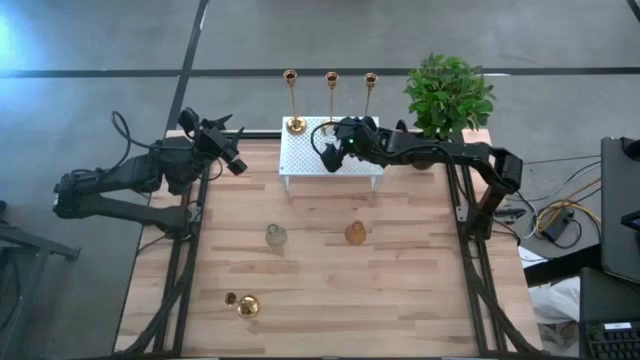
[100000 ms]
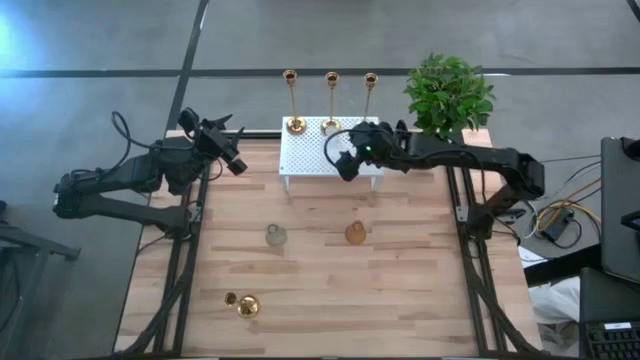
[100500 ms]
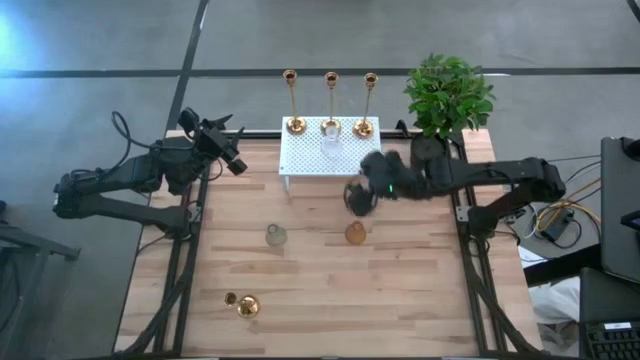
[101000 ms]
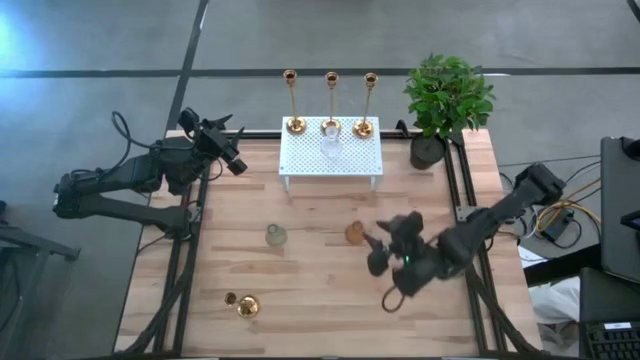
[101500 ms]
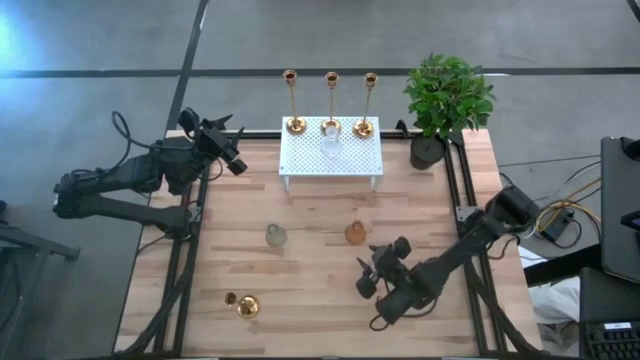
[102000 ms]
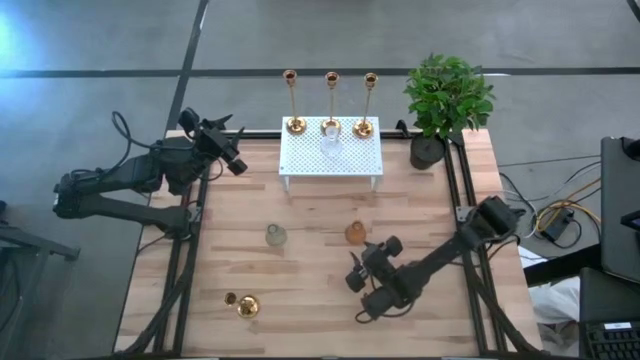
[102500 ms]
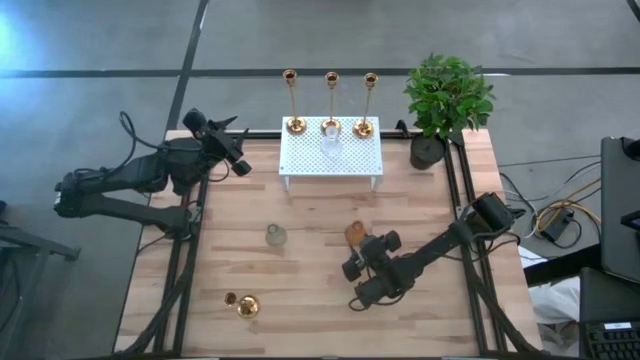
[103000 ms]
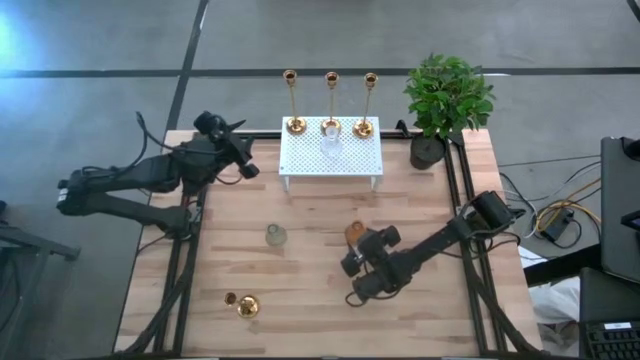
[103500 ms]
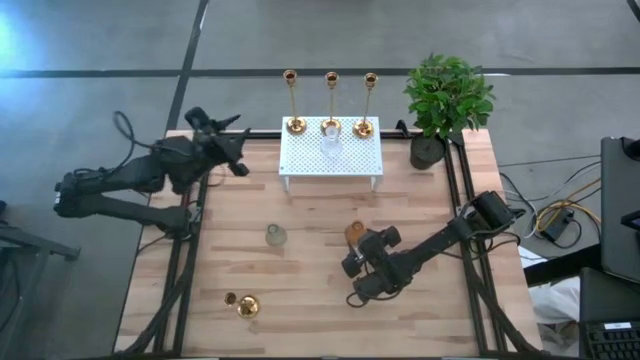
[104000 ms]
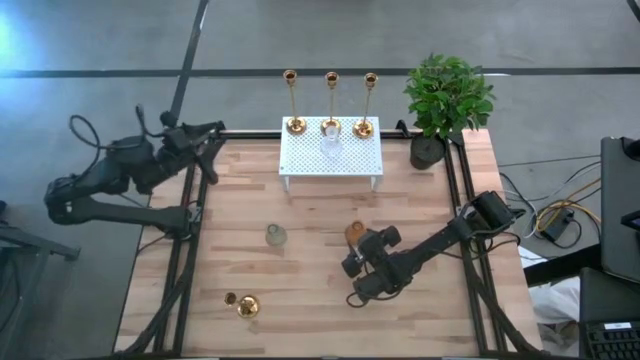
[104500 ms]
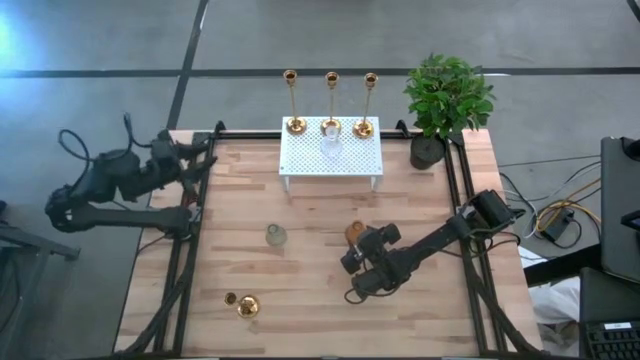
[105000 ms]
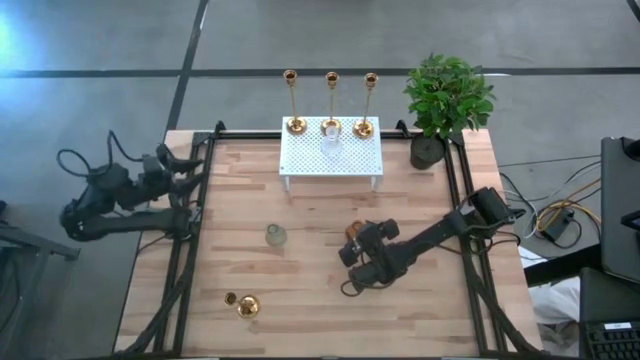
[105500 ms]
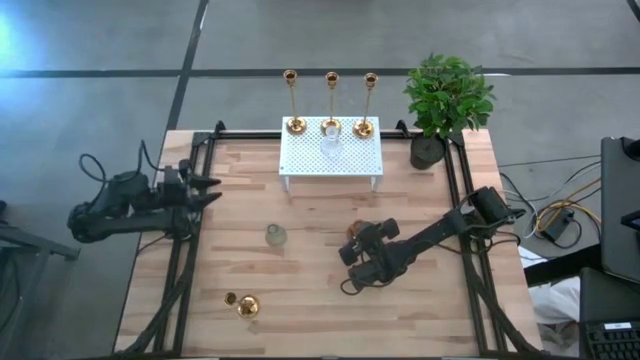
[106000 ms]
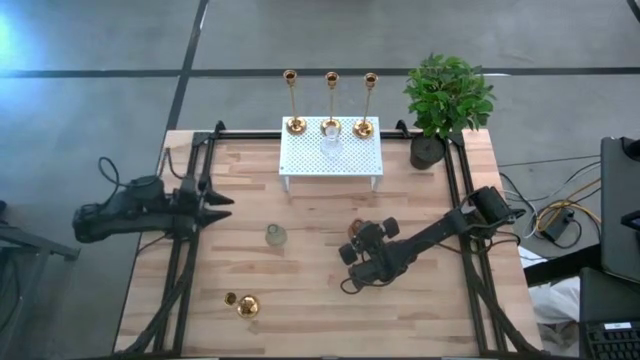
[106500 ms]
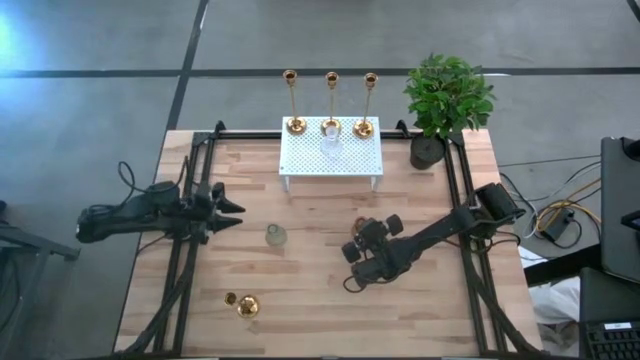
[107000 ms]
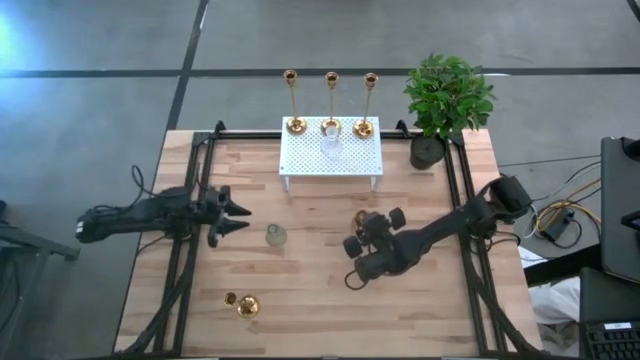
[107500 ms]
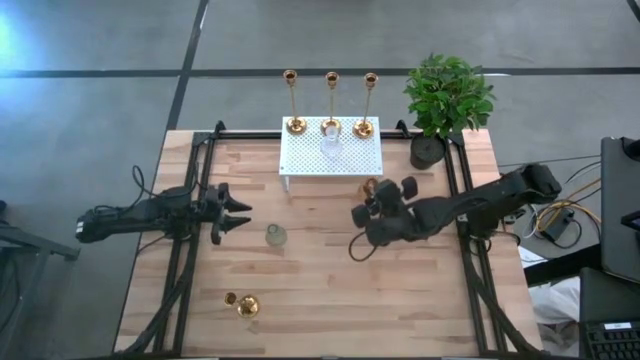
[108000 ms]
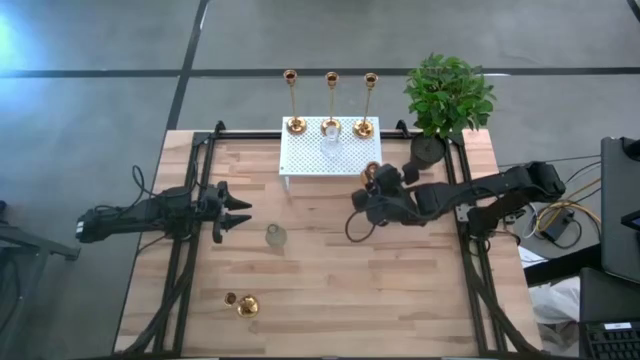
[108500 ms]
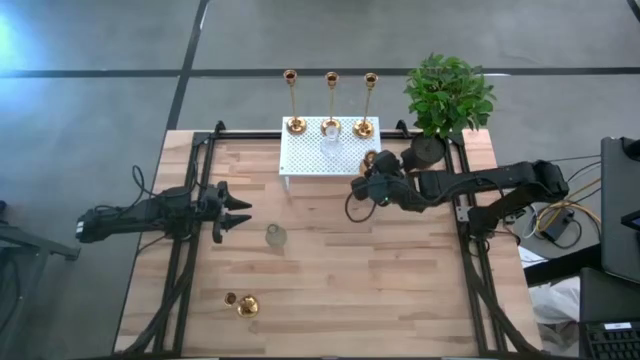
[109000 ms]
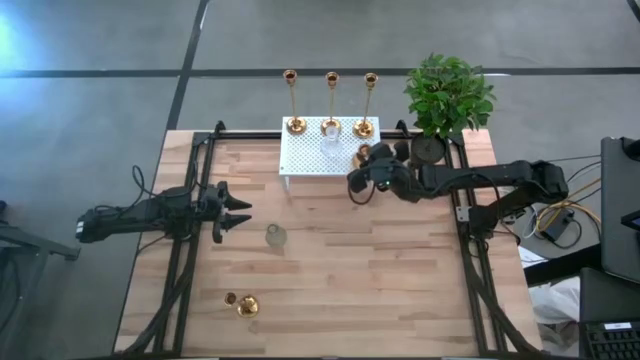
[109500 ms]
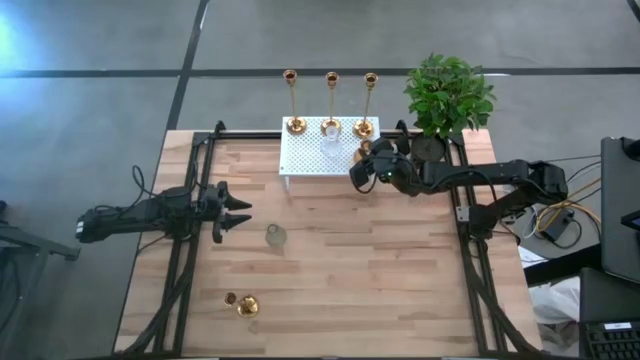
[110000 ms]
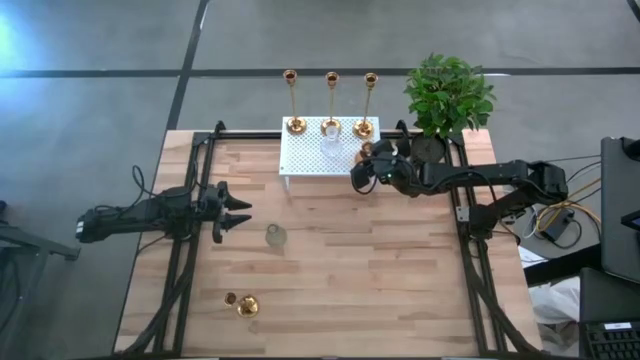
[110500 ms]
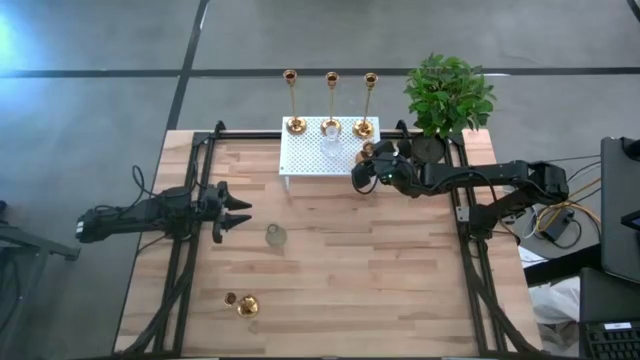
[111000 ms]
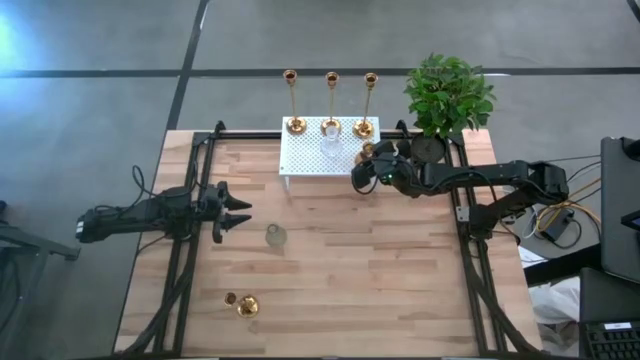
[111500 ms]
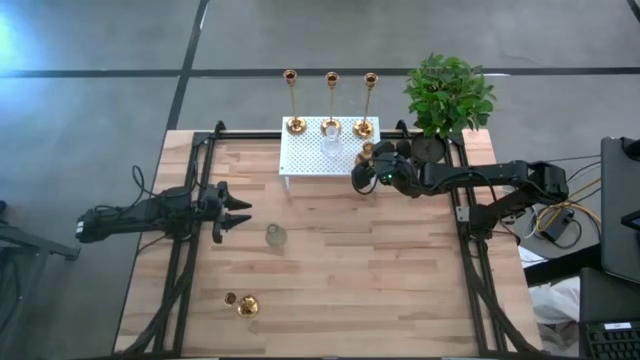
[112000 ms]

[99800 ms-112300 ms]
Task: Pick & Place candle stick holders
Put the yellow glass candle holder on the shelf

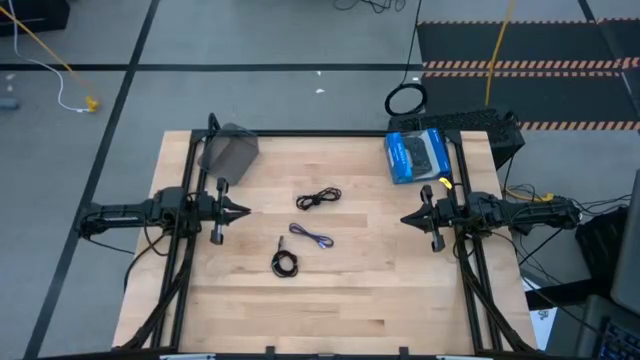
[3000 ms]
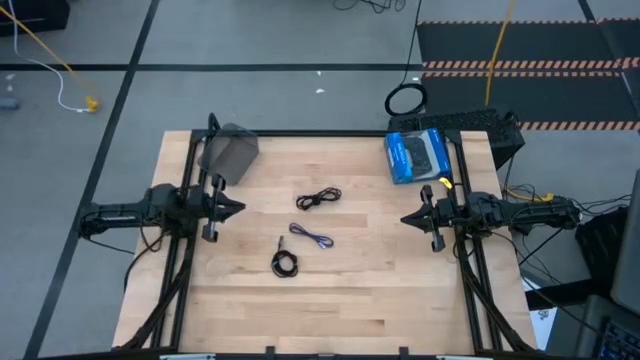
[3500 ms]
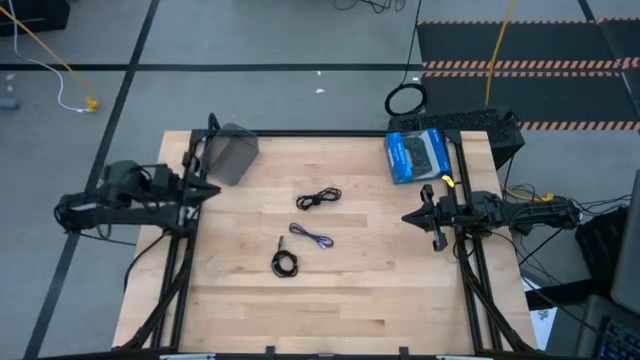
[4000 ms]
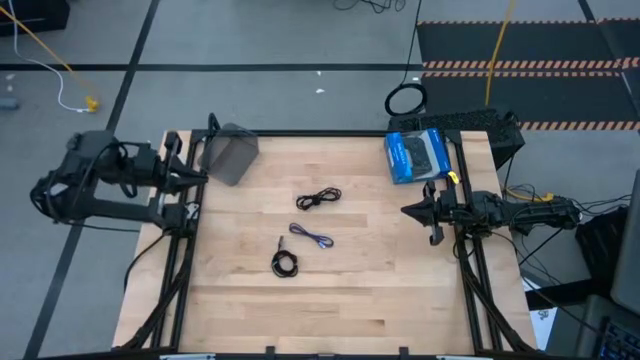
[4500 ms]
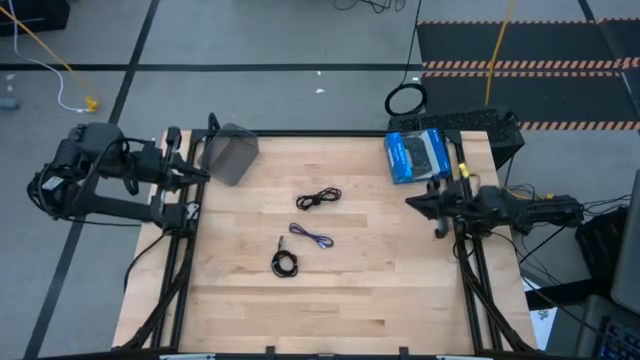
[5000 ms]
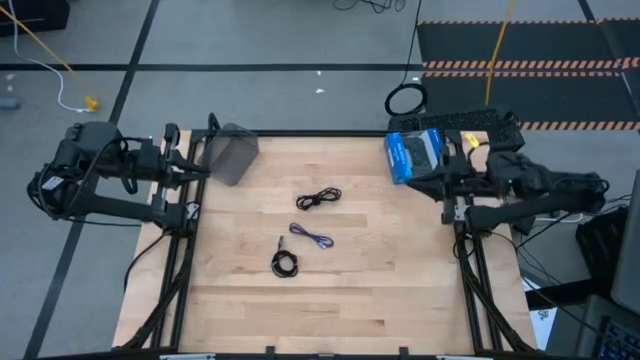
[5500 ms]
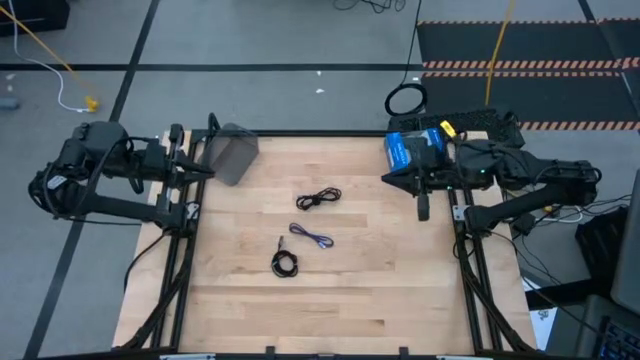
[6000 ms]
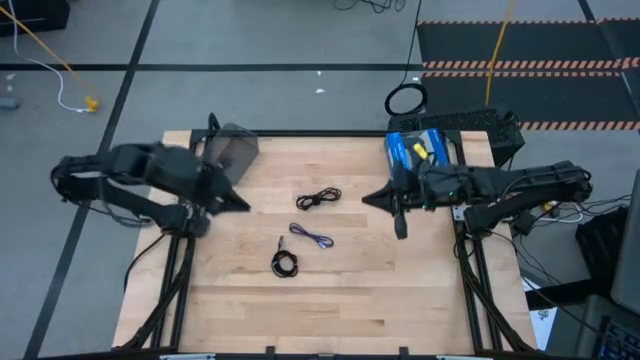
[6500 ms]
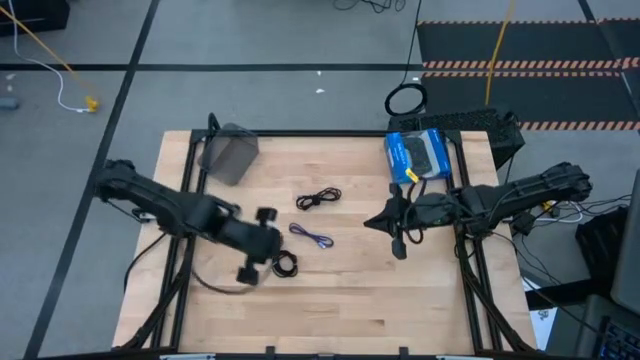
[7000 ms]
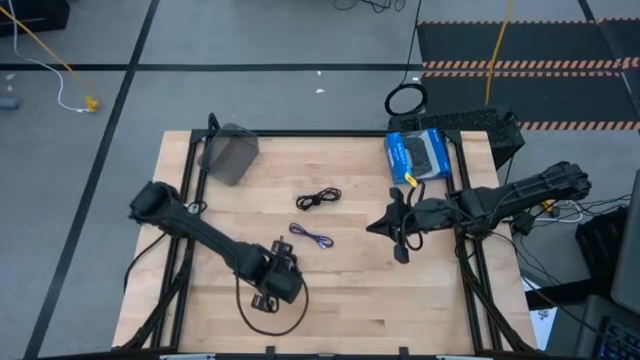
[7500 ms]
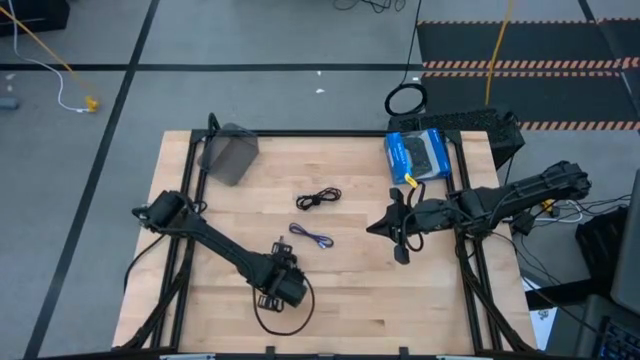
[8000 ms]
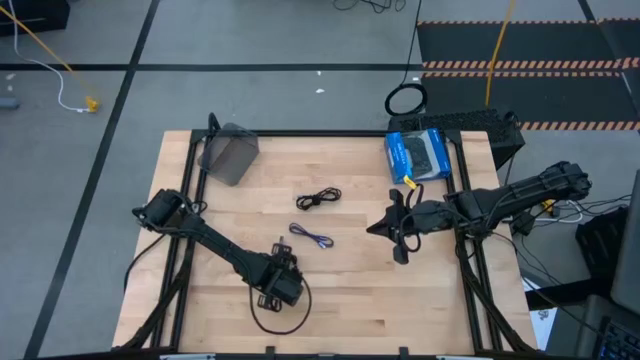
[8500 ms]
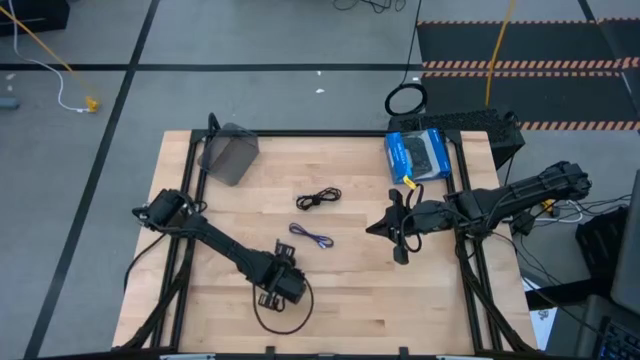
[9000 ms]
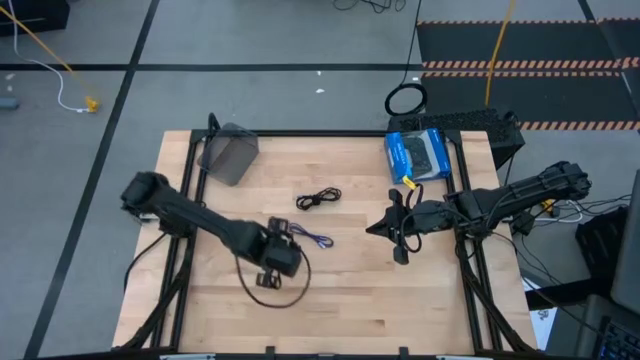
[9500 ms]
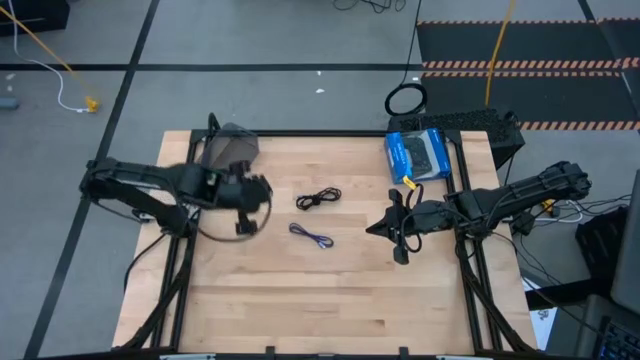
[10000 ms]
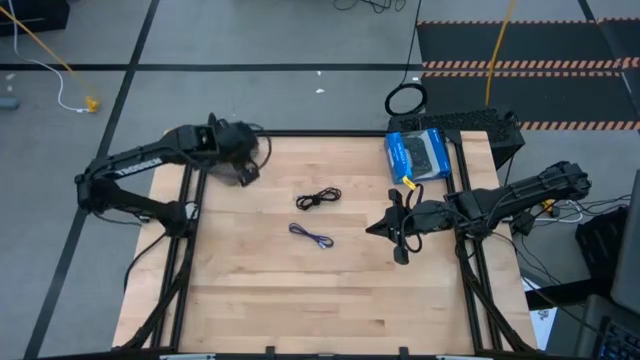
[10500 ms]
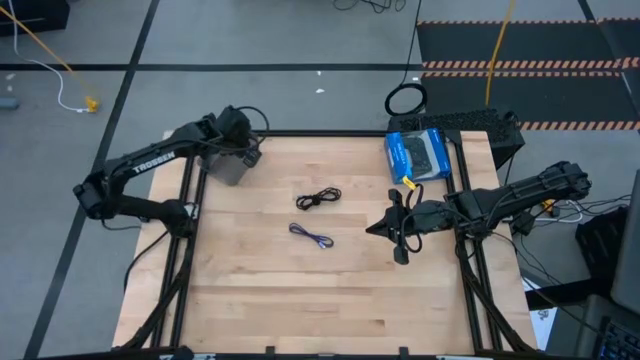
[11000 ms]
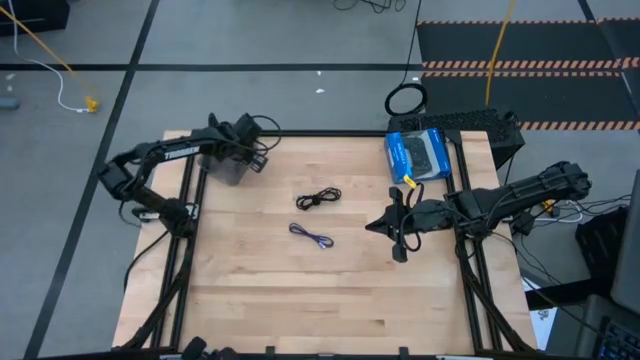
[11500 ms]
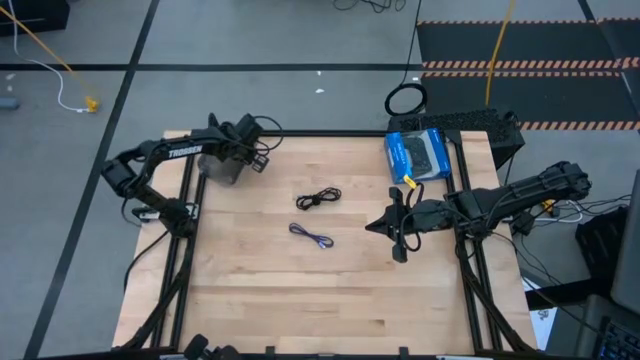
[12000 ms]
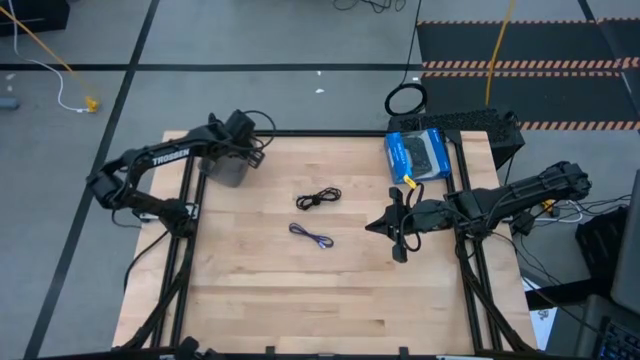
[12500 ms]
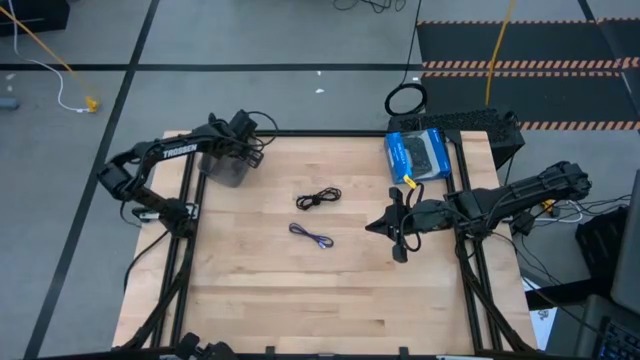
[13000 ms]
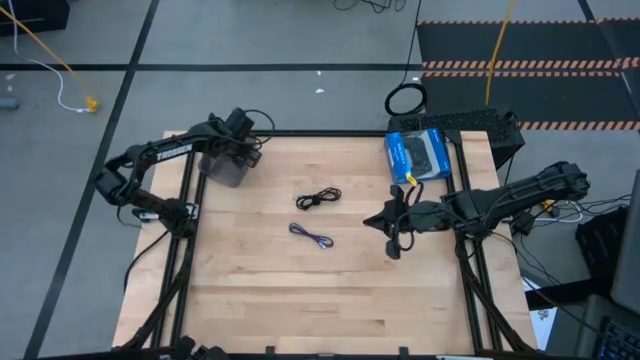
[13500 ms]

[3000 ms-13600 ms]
Task: Pick and place USB-C Cables
Put the bottom black USB cable in the black bin
